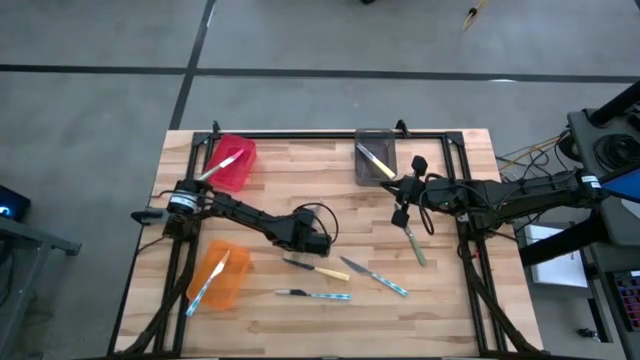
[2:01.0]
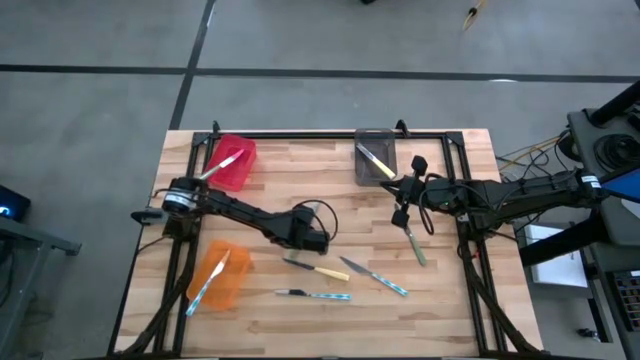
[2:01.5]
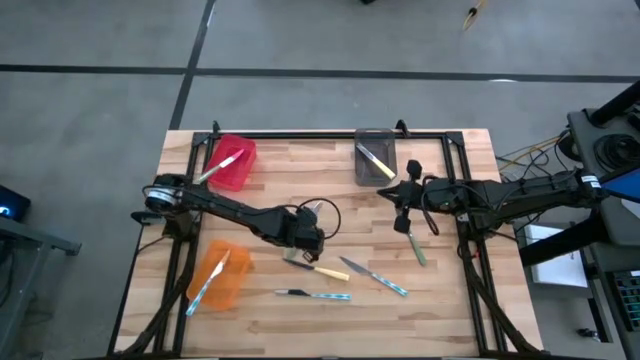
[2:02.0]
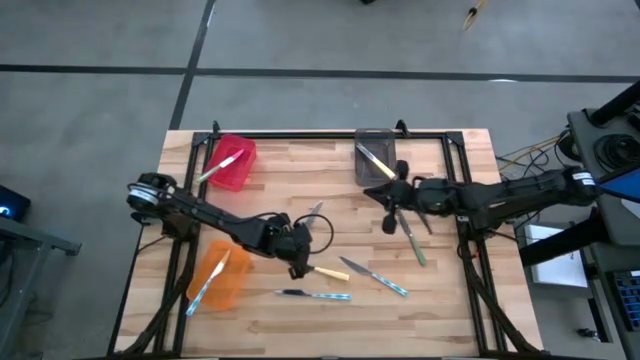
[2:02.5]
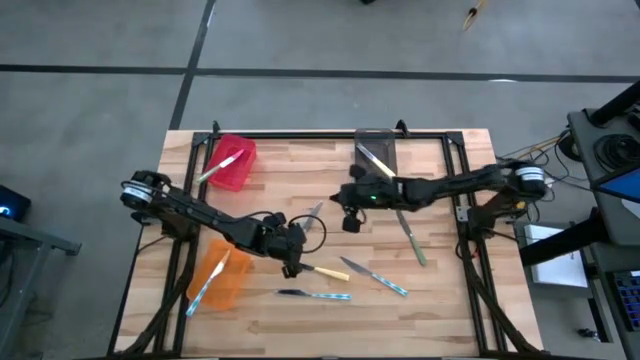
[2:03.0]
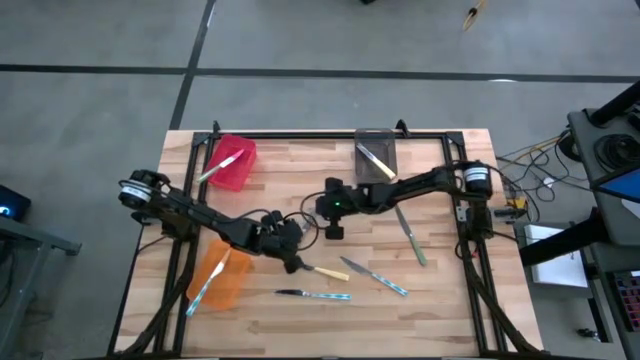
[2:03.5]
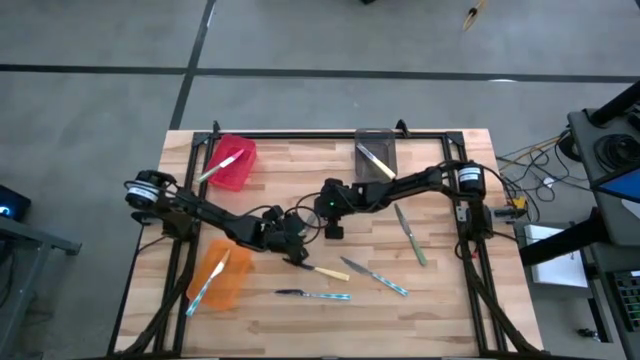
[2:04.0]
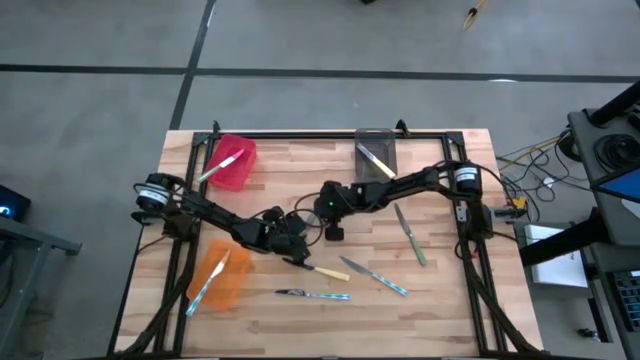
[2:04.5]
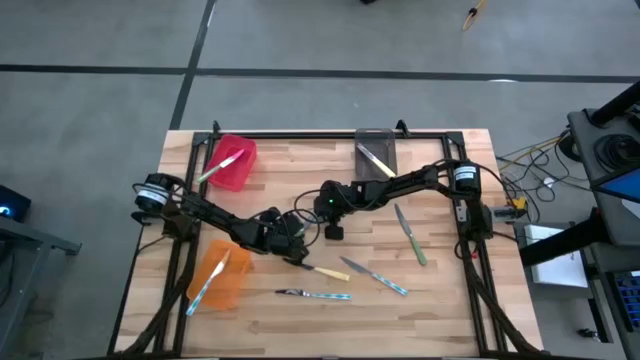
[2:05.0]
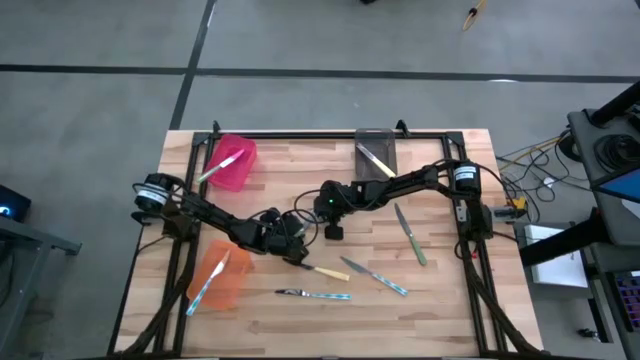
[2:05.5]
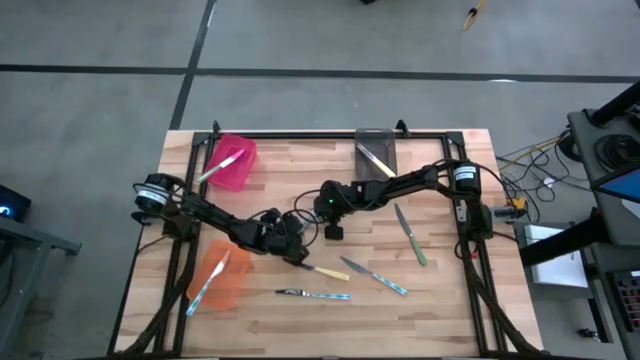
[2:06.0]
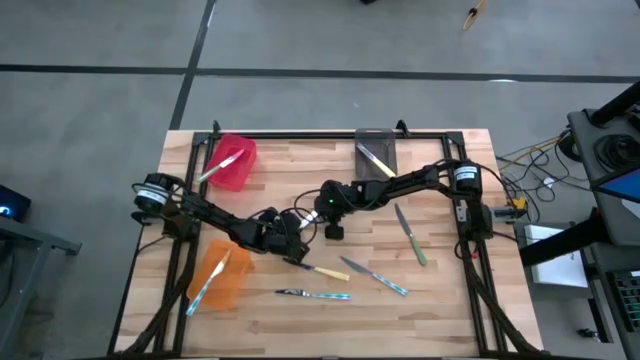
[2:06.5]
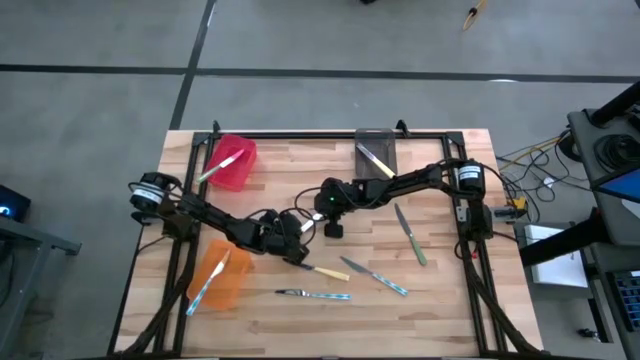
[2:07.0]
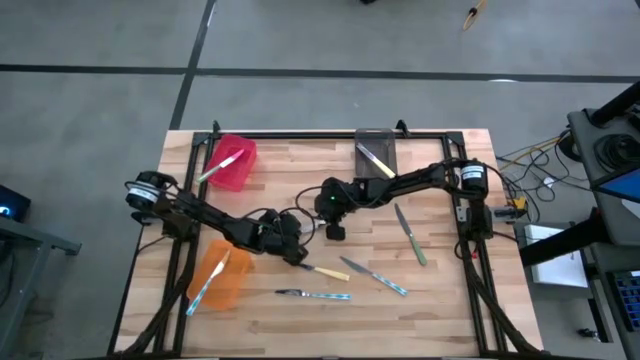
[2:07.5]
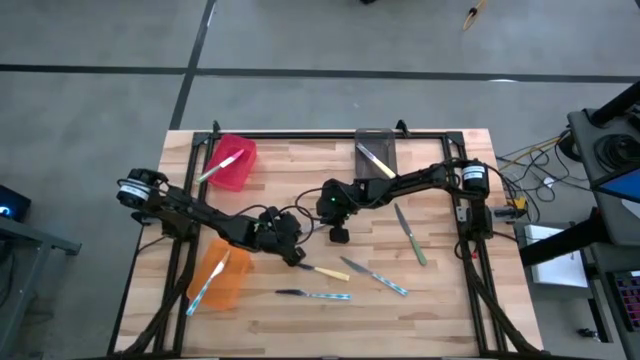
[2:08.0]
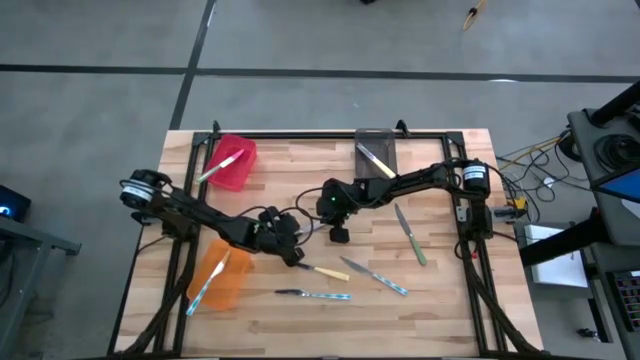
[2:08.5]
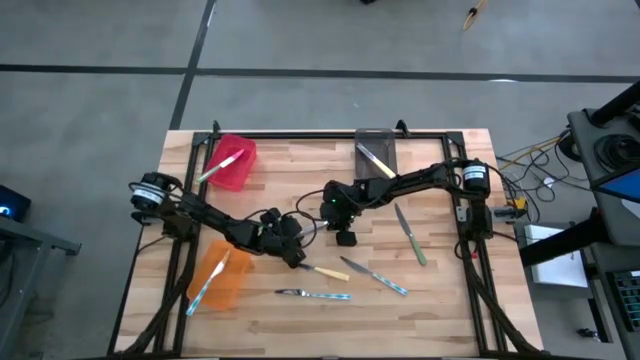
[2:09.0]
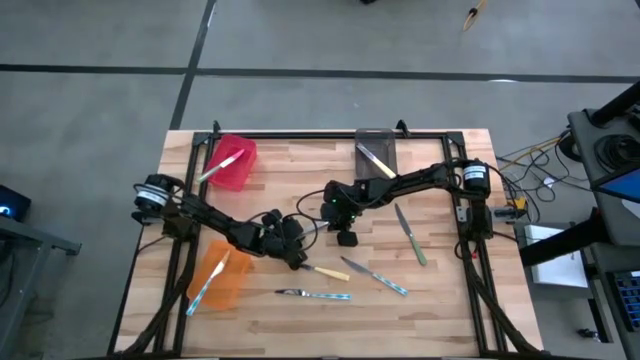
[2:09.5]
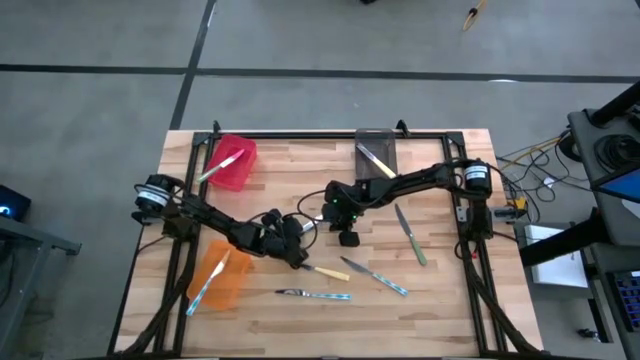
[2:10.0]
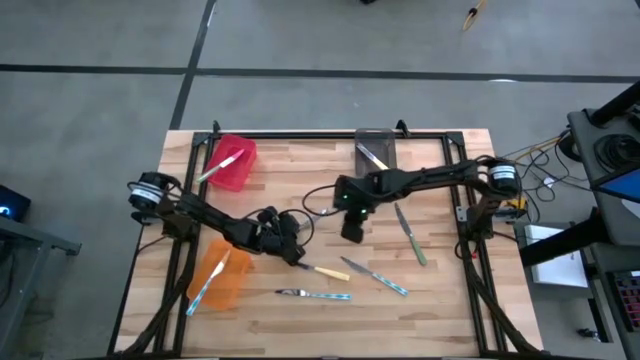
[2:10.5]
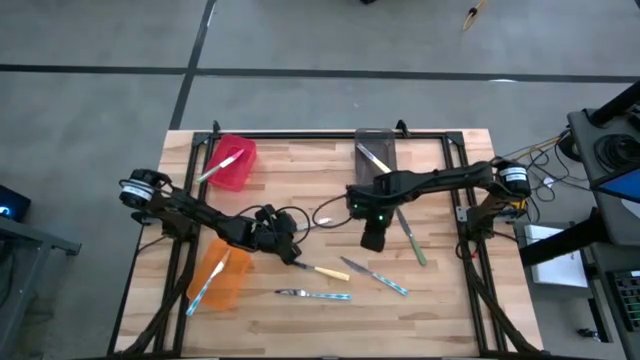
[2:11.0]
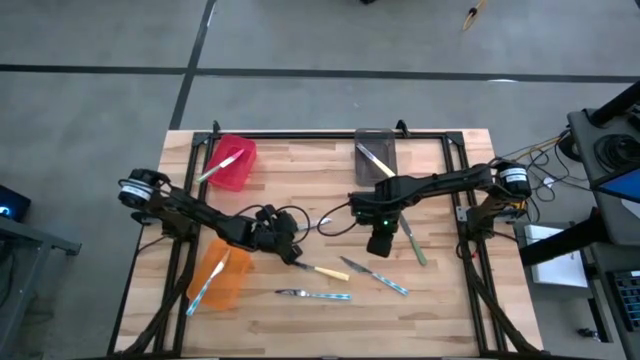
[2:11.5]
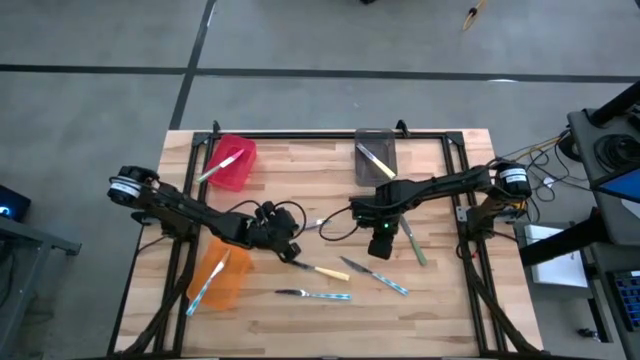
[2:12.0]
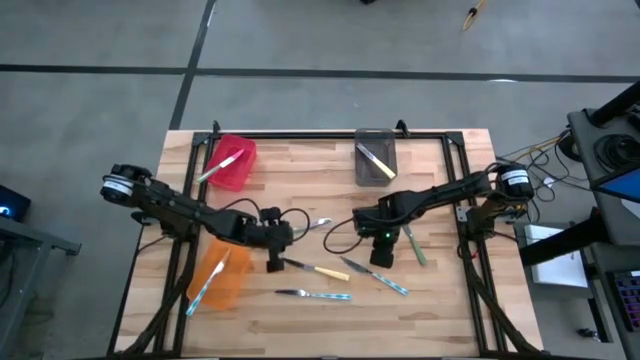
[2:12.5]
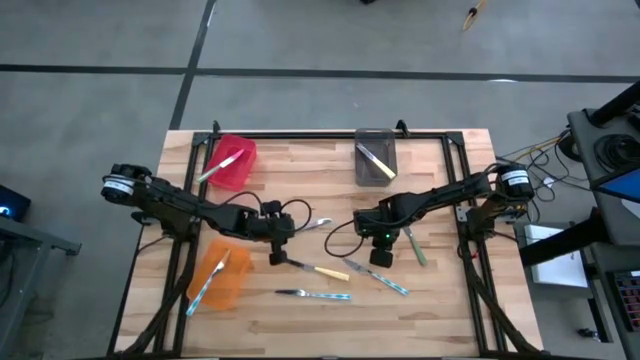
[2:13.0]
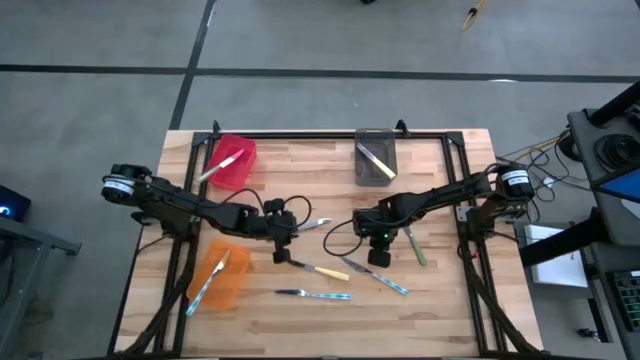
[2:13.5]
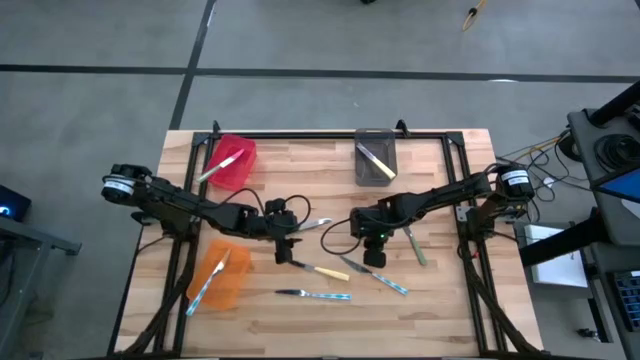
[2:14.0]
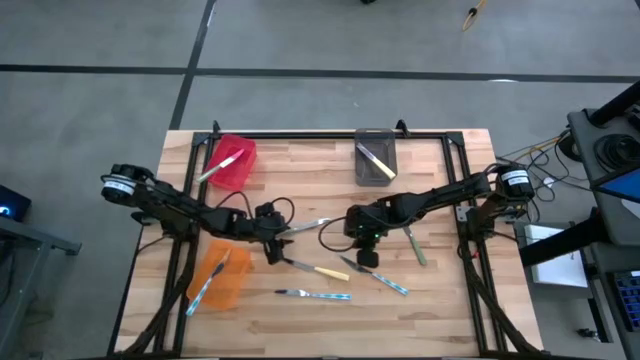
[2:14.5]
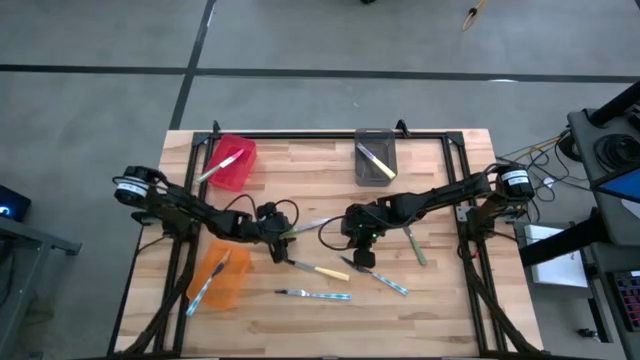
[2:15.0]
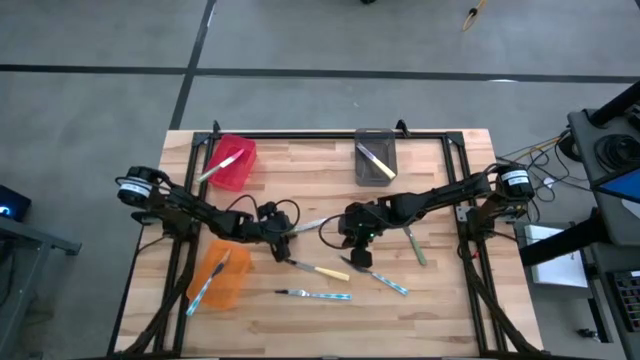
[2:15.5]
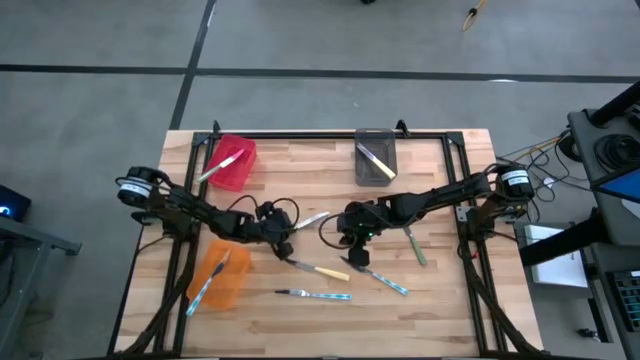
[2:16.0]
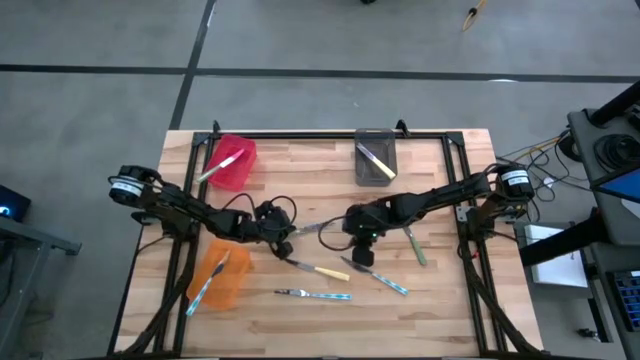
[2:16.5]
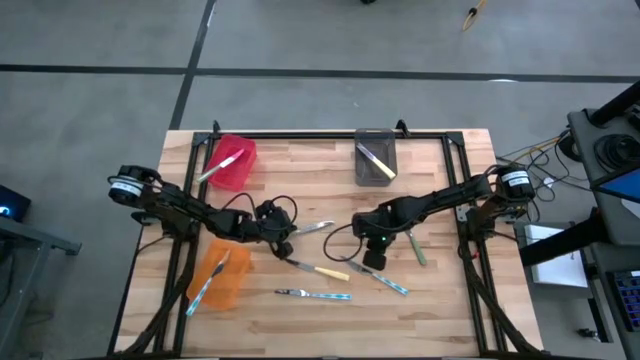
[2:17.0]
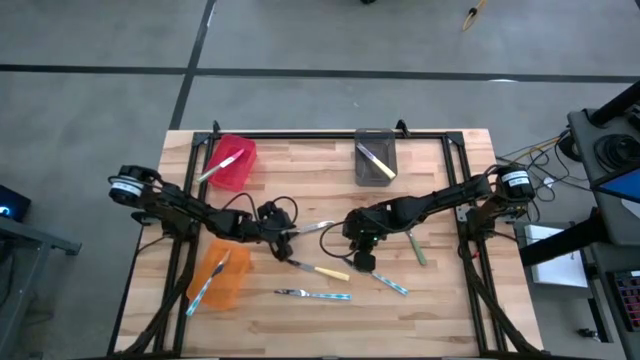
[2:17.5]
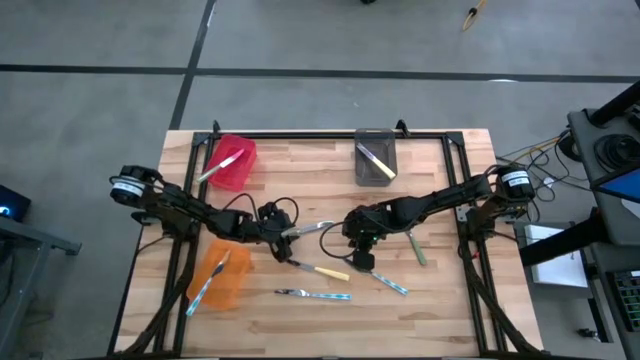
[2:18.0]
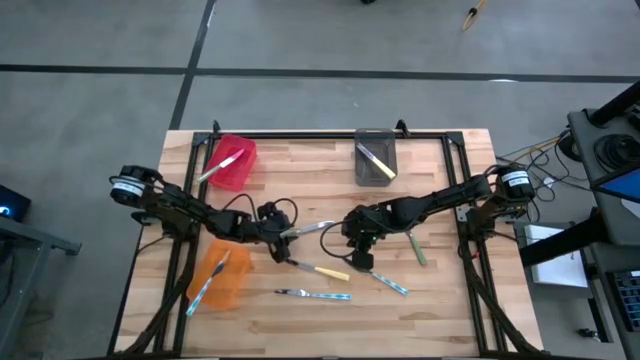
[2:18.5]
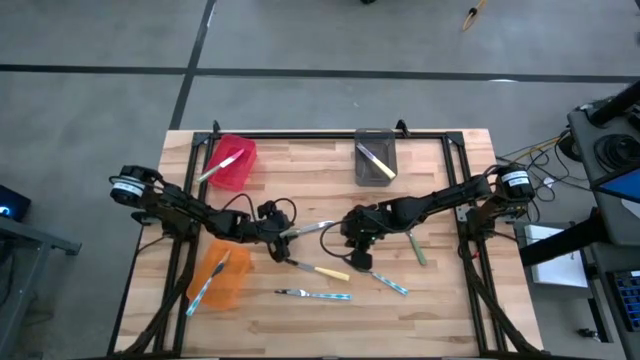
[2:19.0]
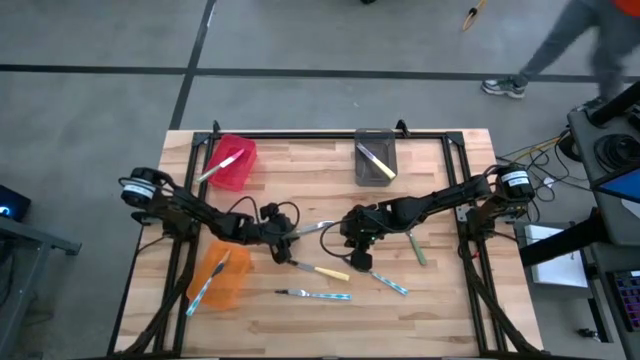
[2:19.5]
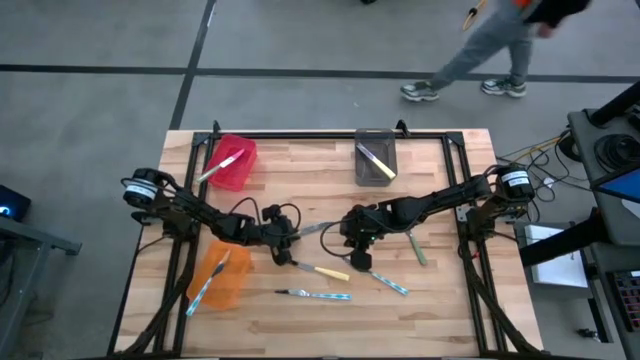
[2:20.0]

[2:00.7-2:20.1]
Task: Sort silverware by color (type)
Put the left green knife into the red bin

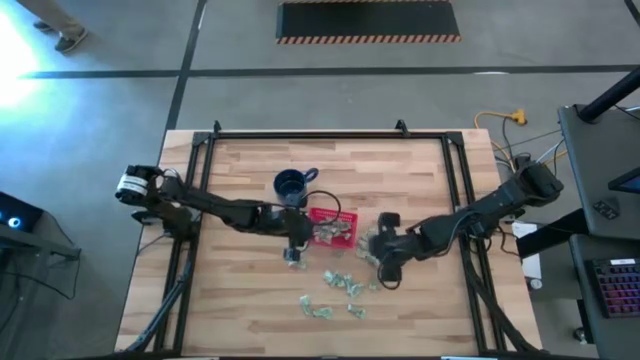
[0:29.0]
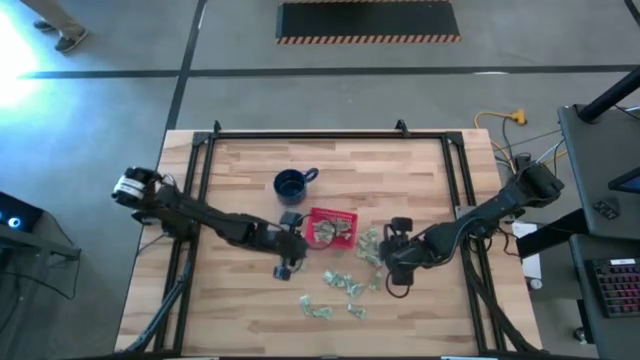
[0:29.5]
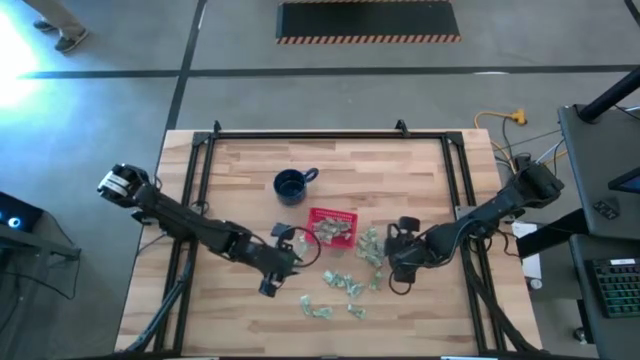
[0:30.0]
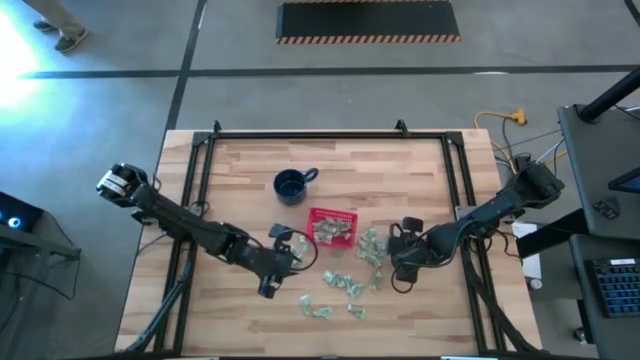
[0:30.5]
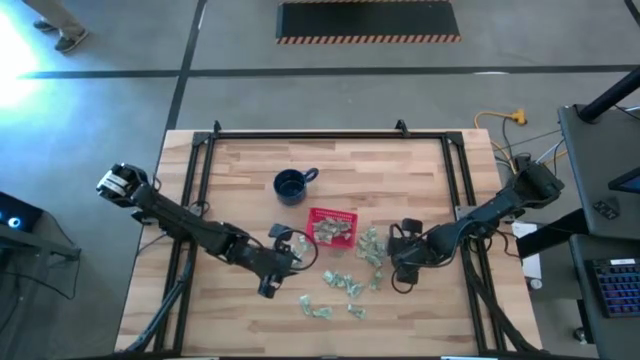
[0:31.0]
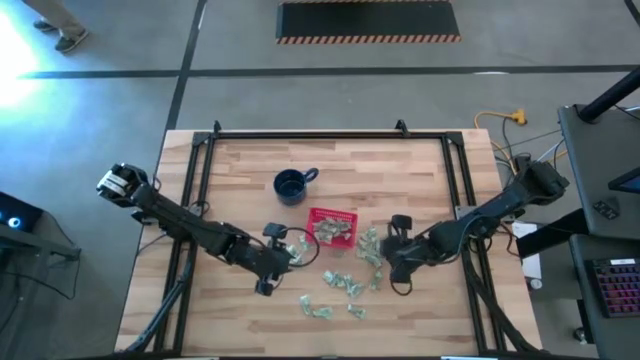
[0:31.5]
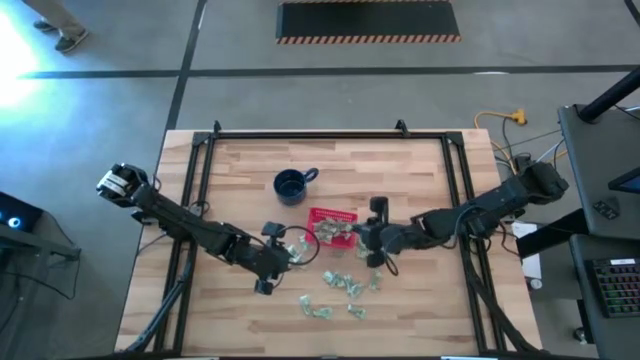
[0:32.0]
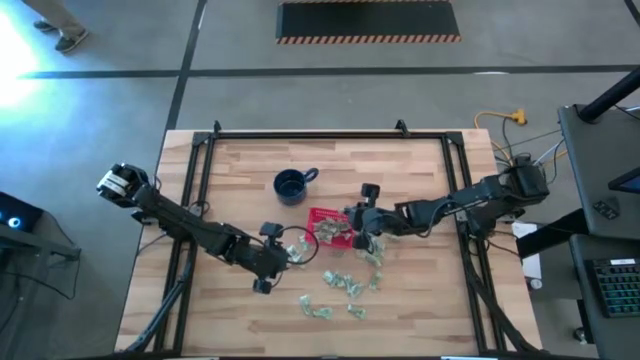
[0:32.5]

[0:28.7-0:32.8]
Task: Pick and place Stevia / Truvia into bins
Put the white stevia packet into the red basket
